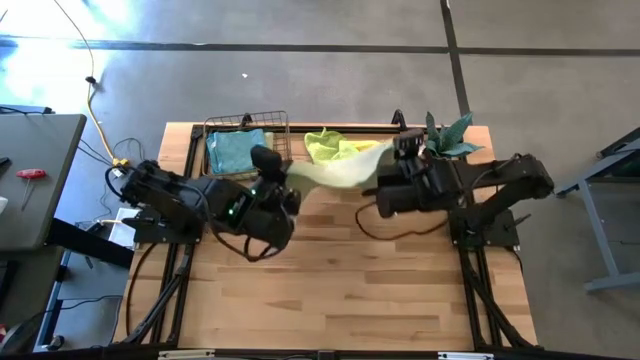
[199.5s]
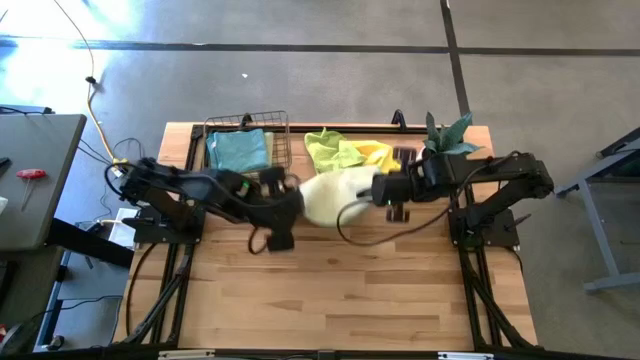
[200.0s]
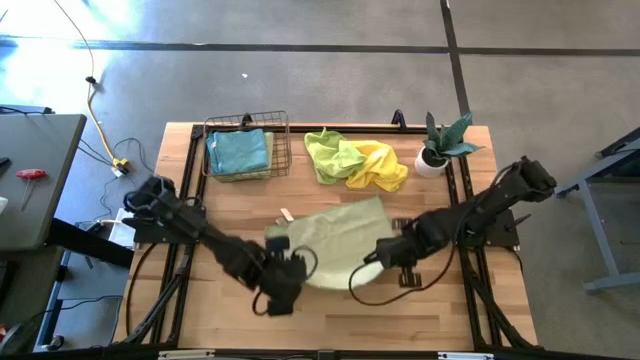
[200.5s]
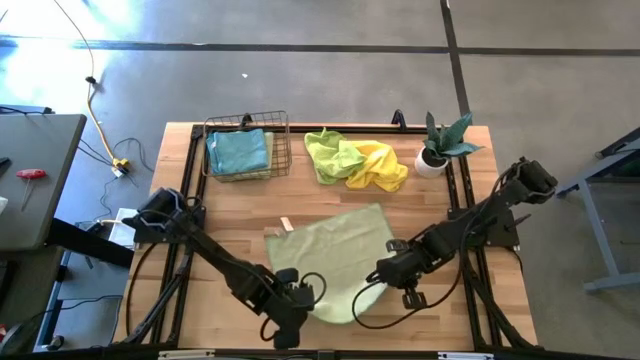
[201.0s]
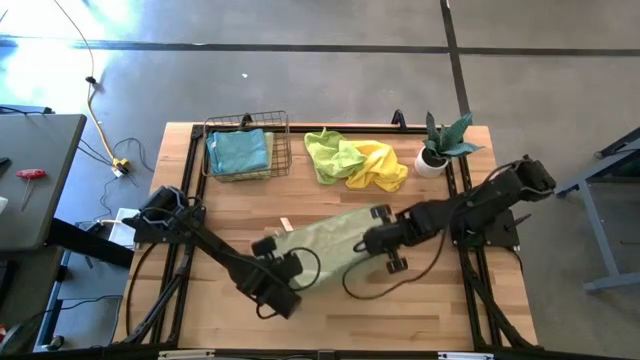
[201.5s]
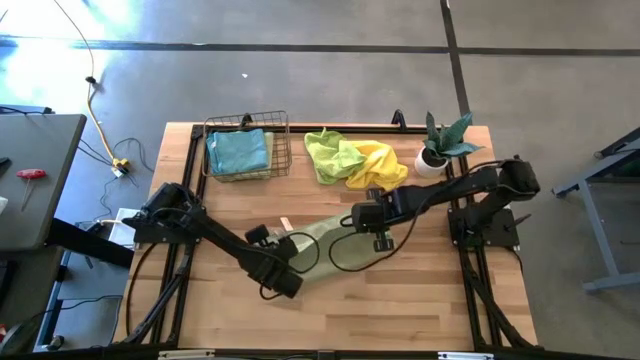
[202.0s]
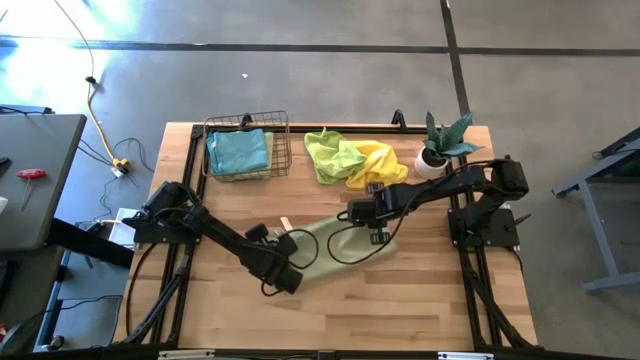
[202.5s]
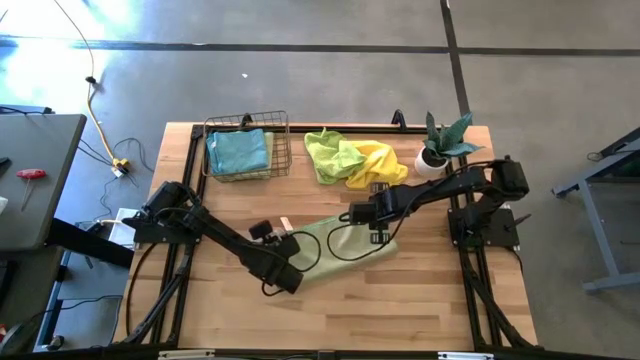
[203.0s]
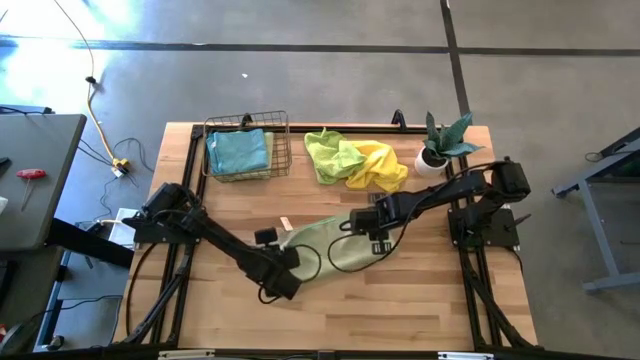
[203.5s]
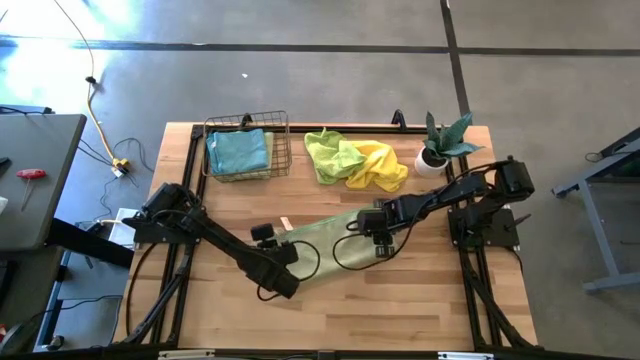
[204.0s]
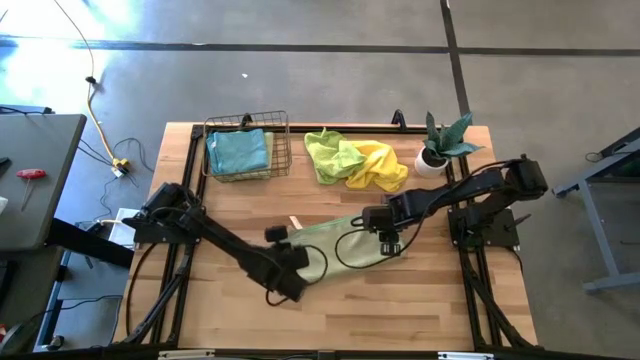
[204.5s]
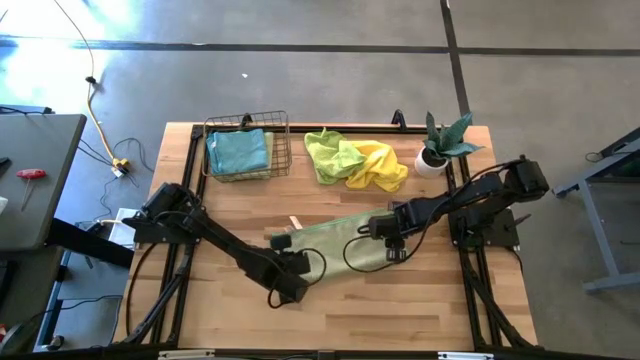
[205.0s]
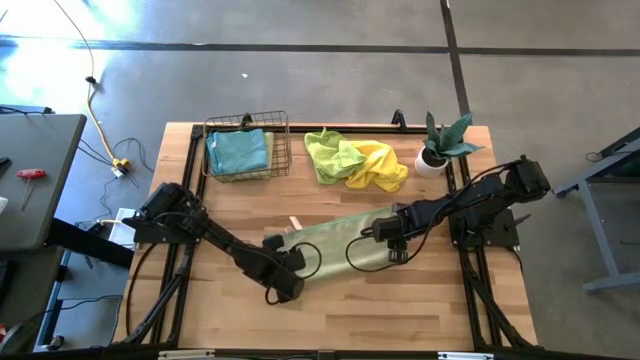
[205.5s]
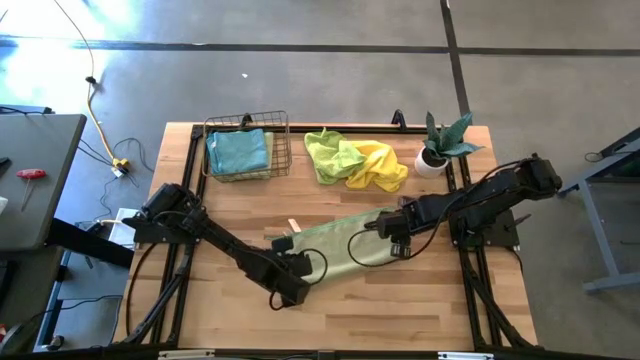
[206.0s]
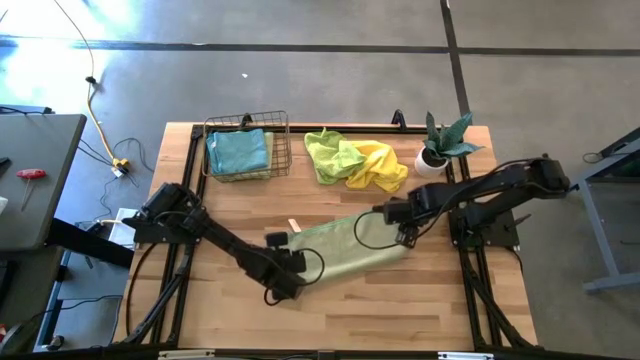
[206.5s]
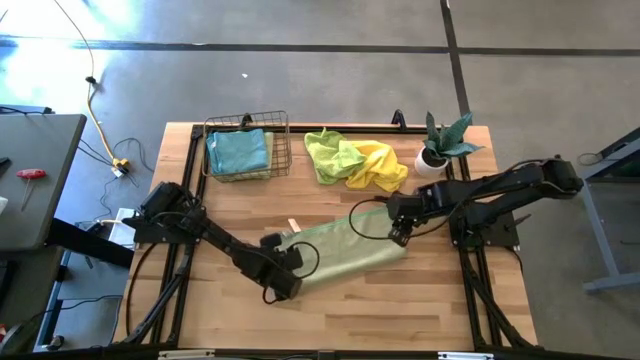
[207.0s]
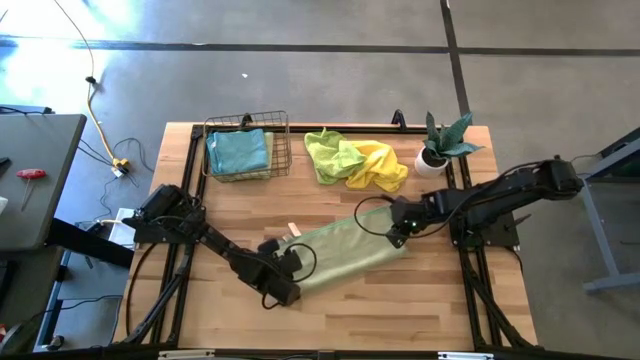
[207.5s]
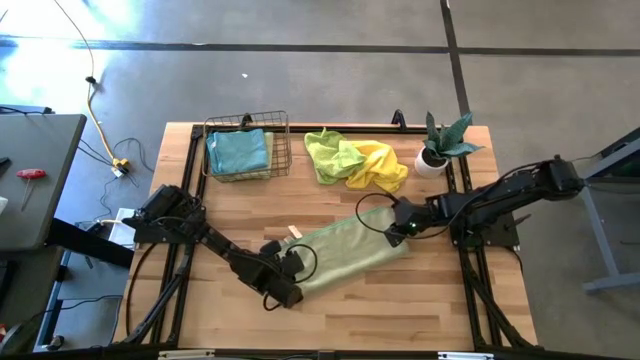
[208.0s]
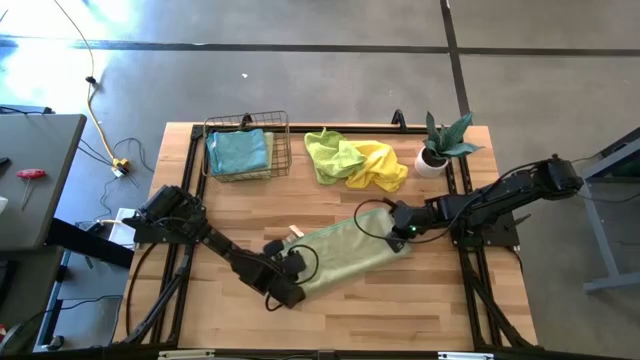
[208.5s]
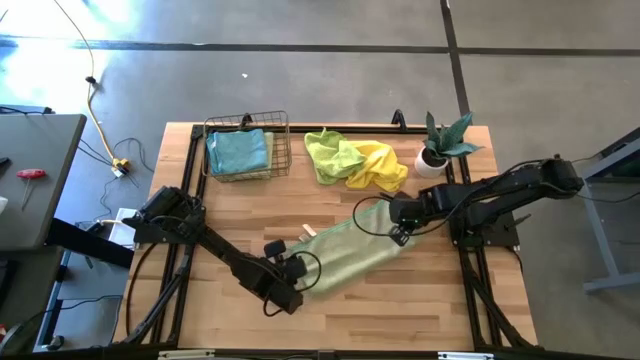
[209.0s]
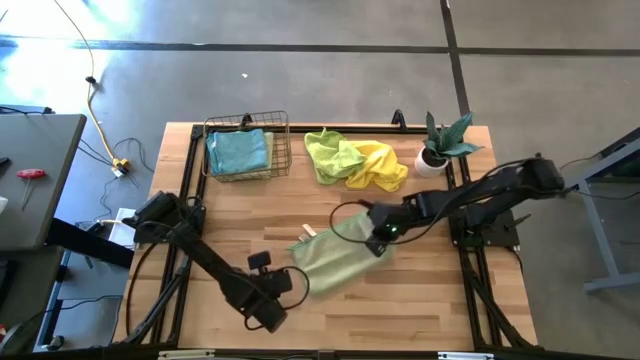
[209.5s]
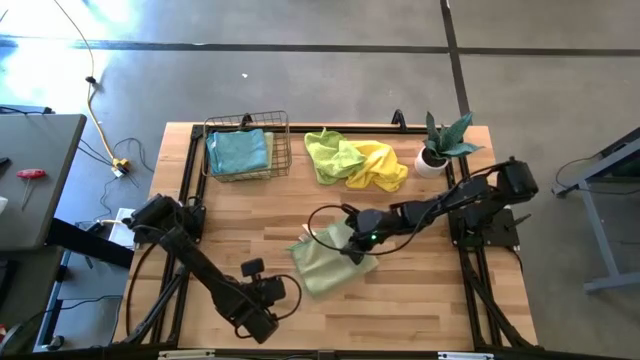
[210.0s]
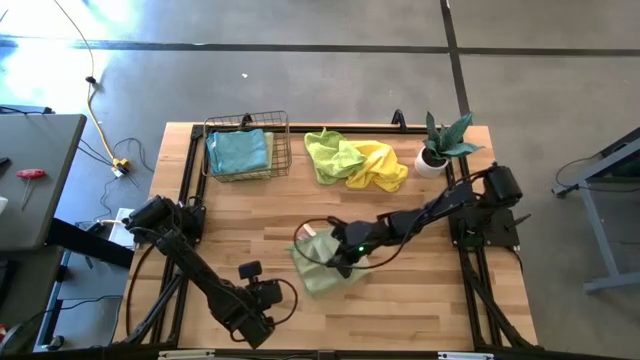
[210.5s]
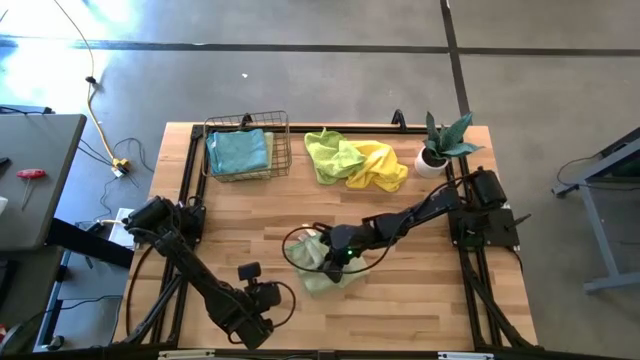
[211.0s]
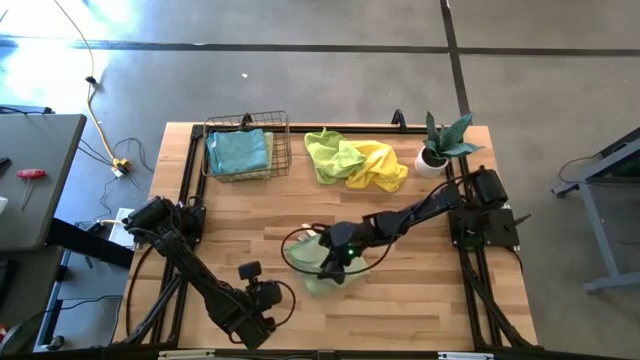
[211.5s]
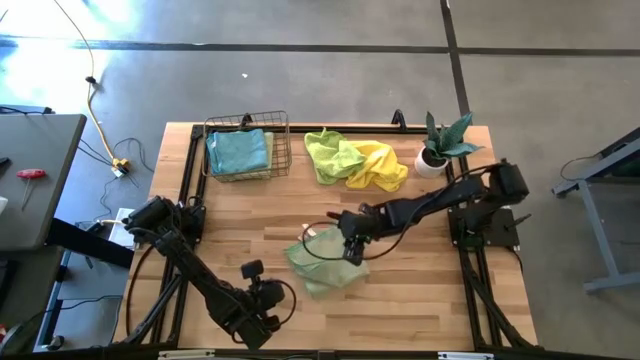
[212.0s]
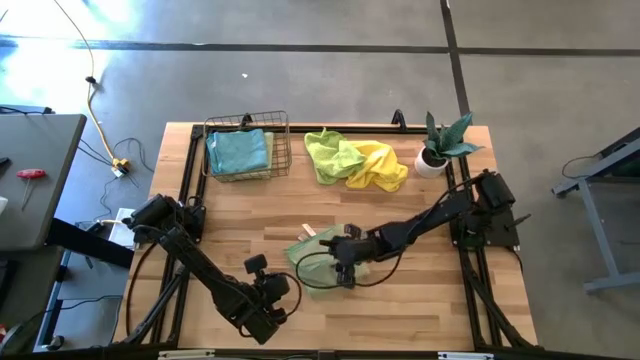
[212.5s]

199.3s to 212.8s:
Task: Fold microfiber towels
Fold the green towel

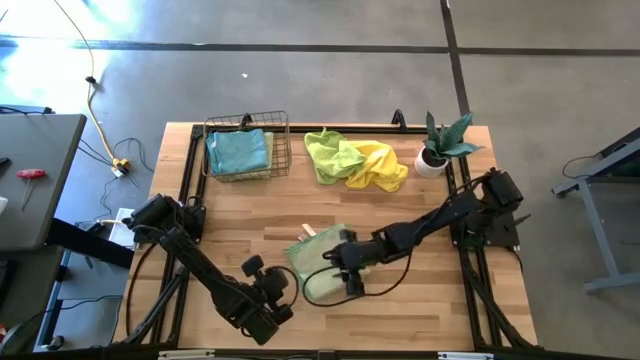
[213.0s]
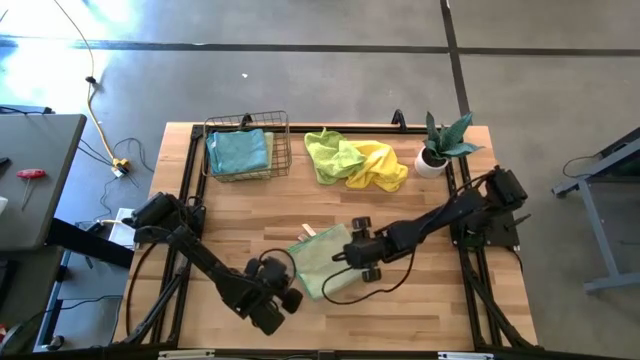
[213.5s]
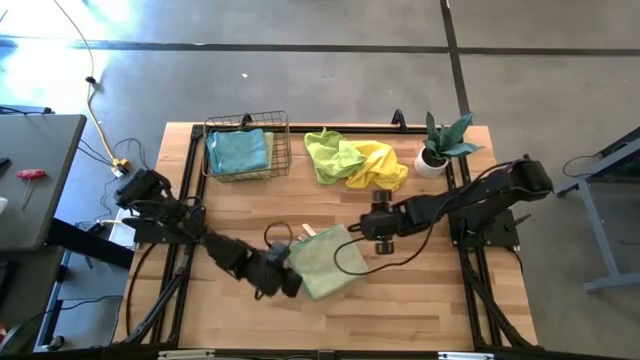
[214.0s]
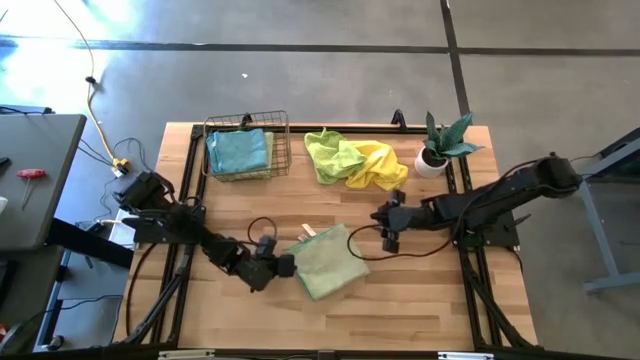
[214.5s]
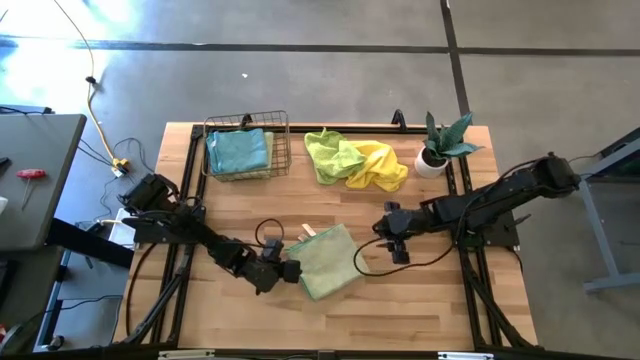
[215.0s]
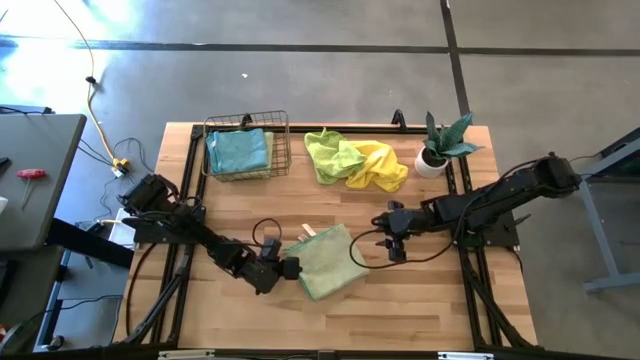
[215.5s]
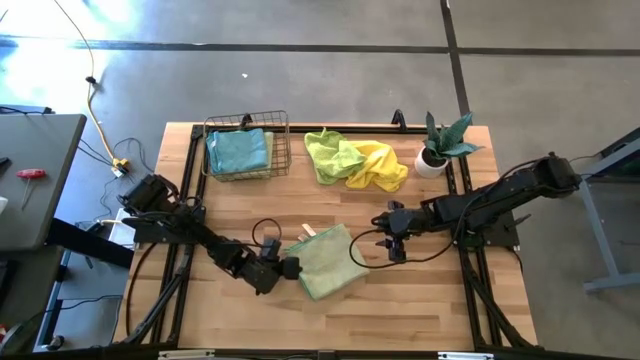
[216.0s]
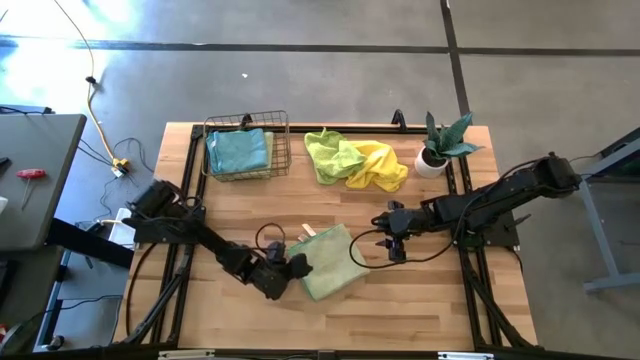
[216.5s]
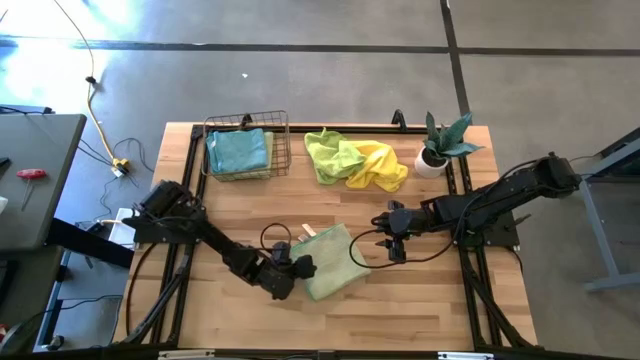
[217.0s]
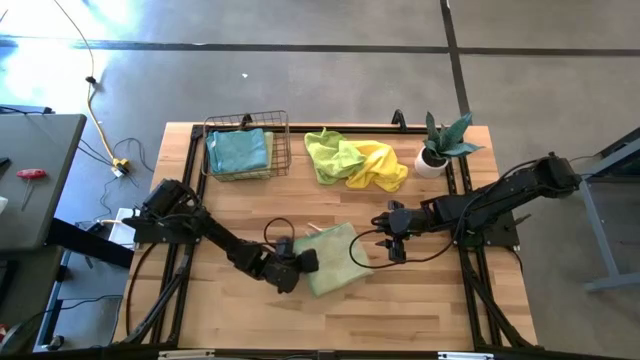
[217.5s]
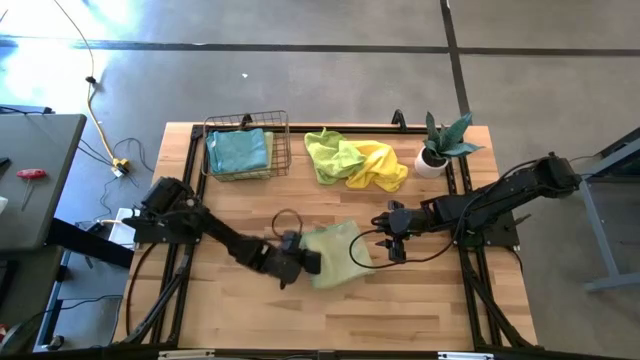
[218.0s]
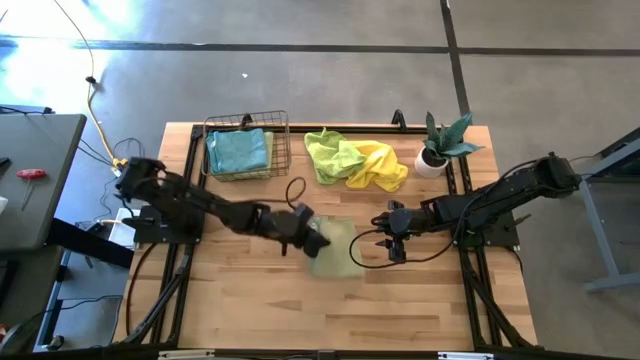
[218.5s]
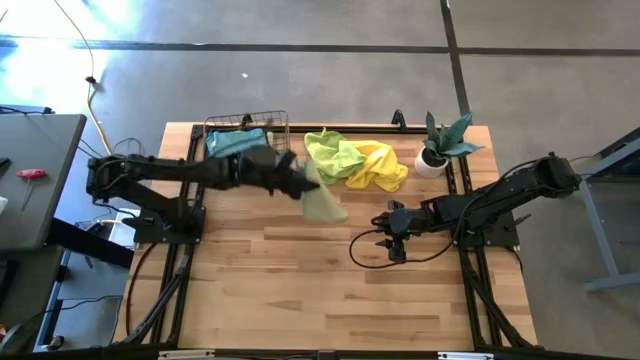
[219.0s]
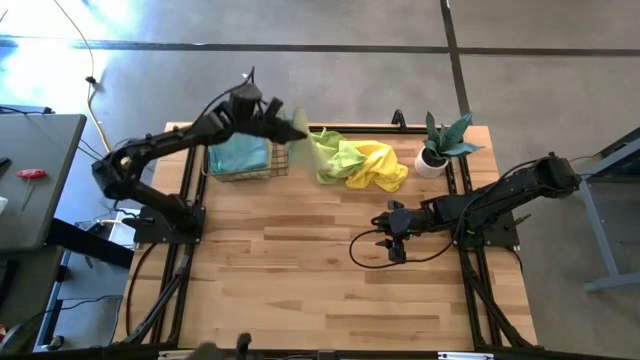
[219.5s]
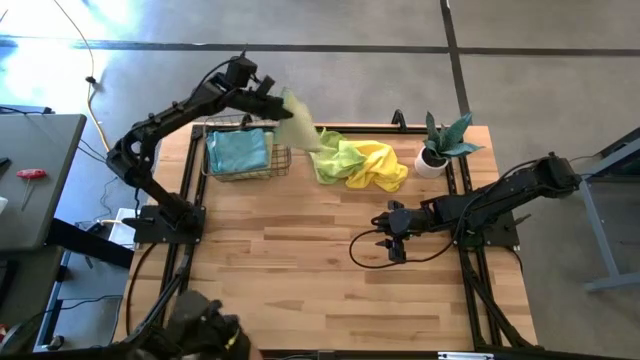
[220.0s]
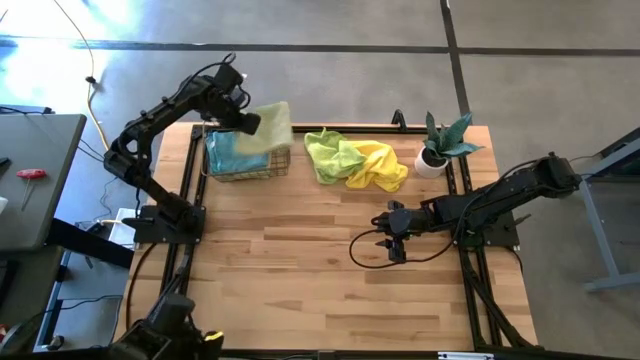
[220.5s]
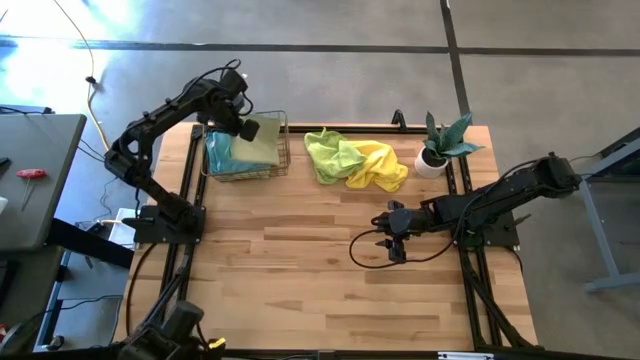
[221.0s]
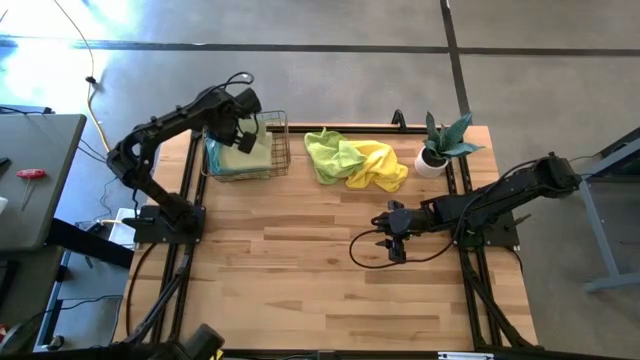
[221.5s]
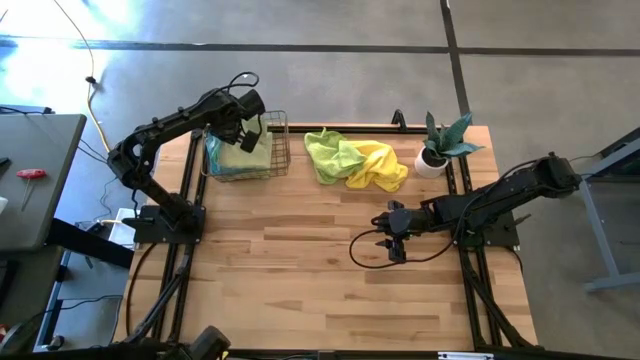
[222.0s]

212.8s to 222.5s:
Put the folded green towel into the wire basket
